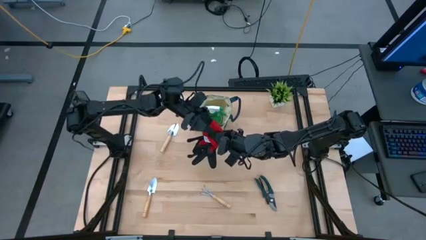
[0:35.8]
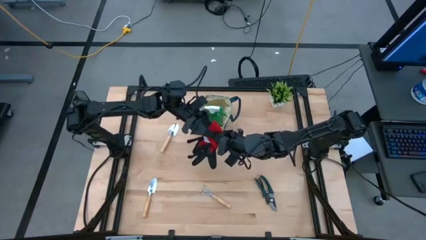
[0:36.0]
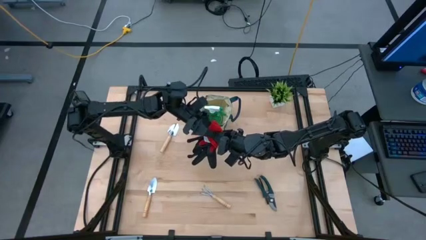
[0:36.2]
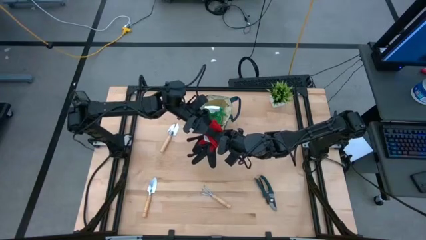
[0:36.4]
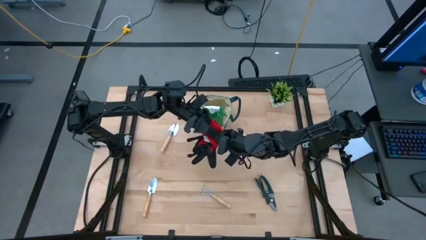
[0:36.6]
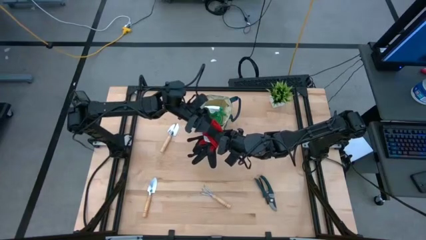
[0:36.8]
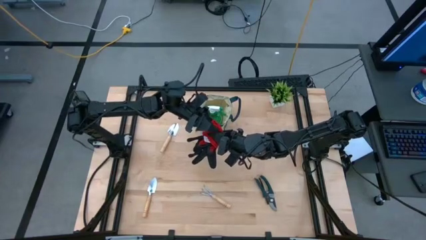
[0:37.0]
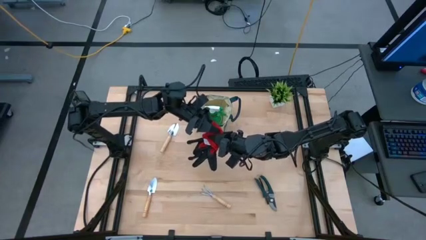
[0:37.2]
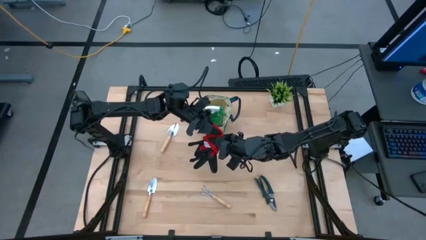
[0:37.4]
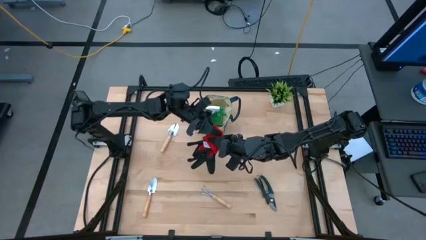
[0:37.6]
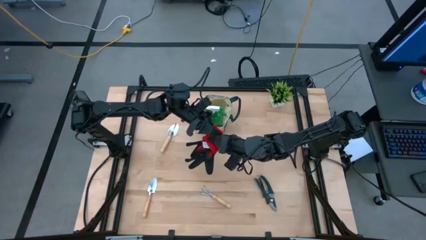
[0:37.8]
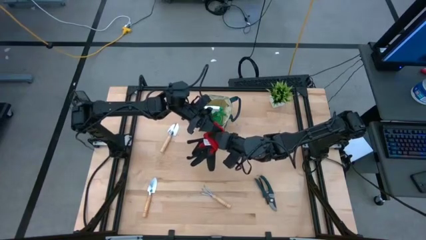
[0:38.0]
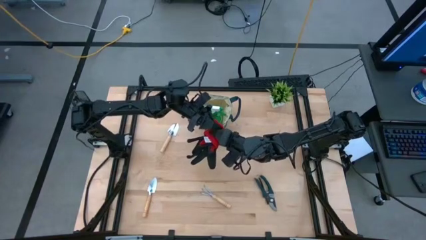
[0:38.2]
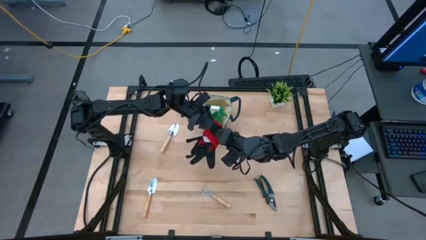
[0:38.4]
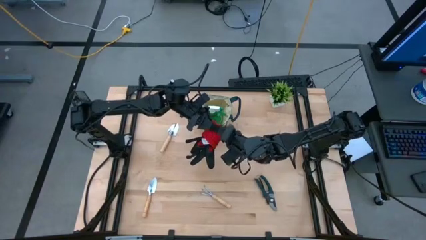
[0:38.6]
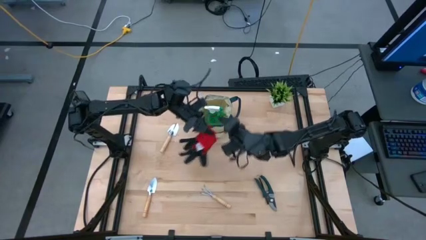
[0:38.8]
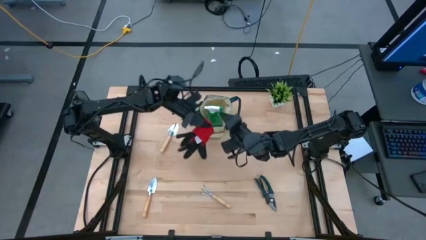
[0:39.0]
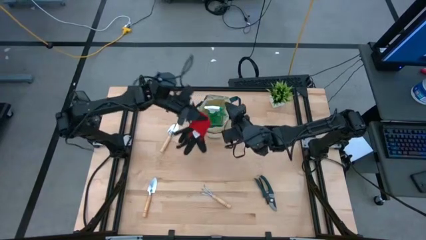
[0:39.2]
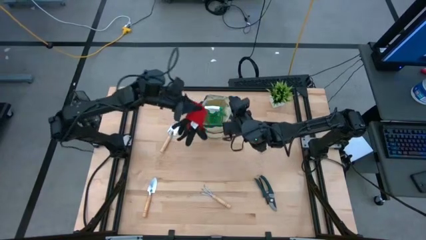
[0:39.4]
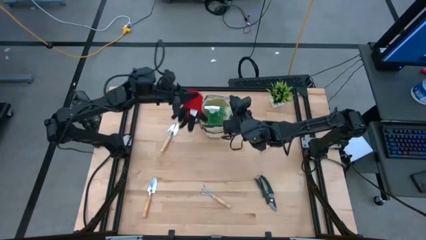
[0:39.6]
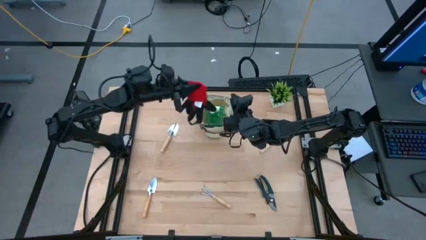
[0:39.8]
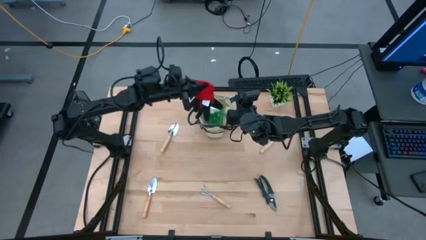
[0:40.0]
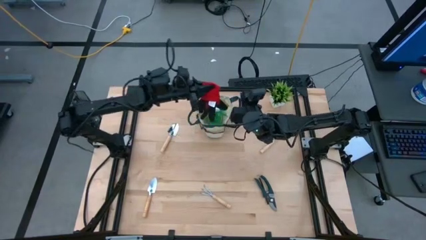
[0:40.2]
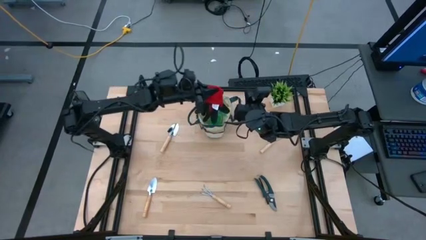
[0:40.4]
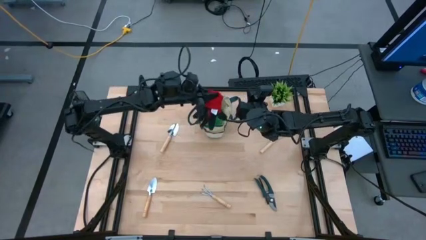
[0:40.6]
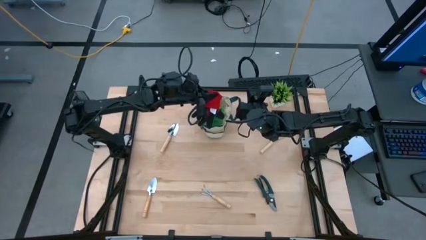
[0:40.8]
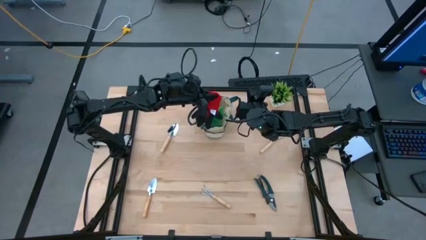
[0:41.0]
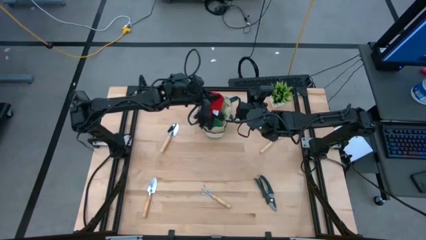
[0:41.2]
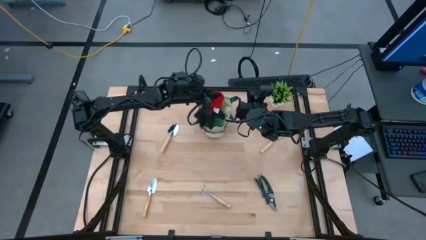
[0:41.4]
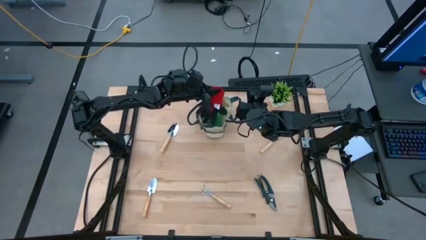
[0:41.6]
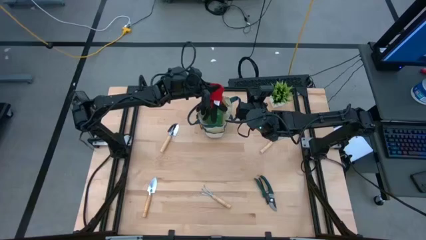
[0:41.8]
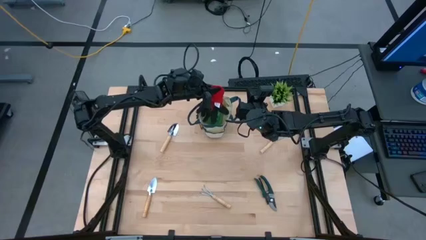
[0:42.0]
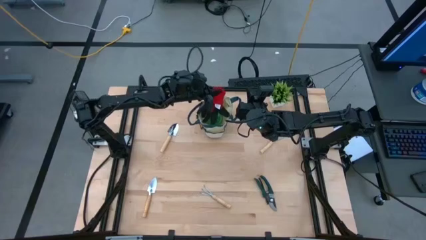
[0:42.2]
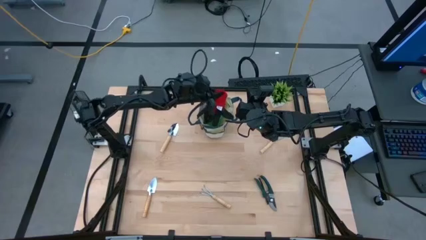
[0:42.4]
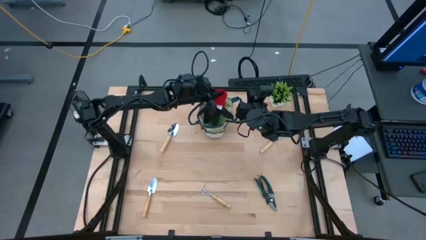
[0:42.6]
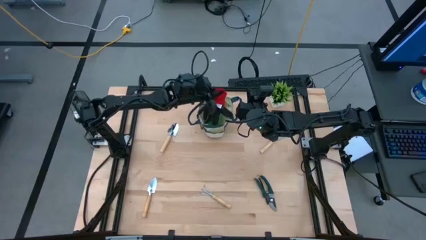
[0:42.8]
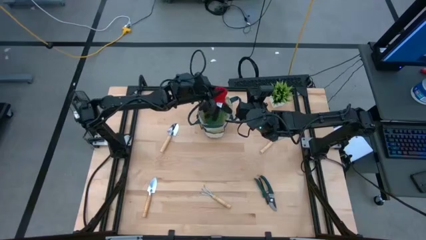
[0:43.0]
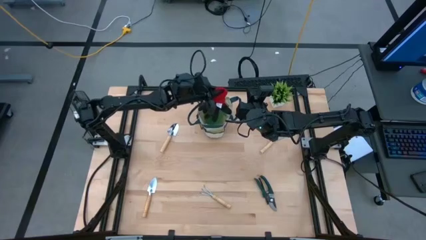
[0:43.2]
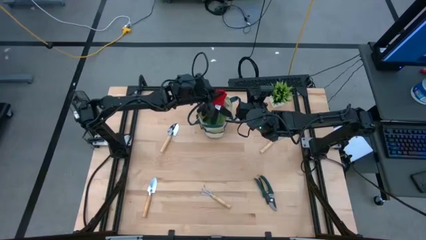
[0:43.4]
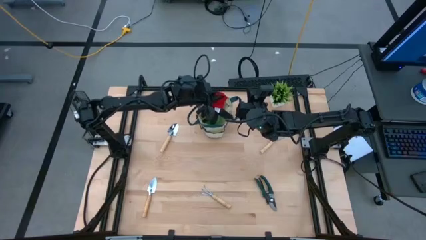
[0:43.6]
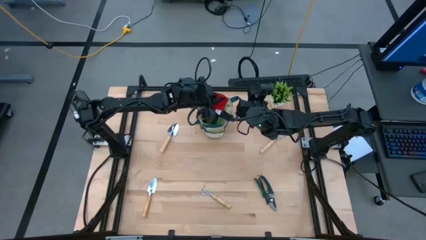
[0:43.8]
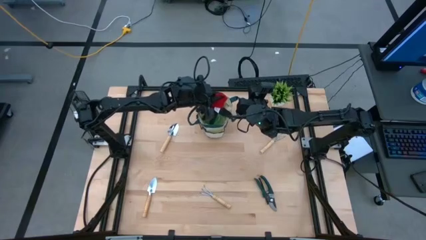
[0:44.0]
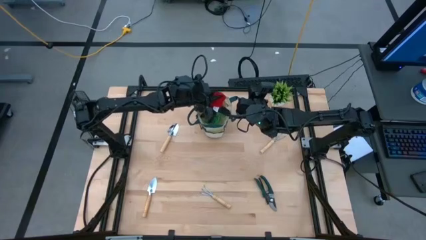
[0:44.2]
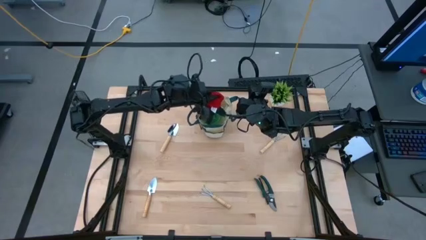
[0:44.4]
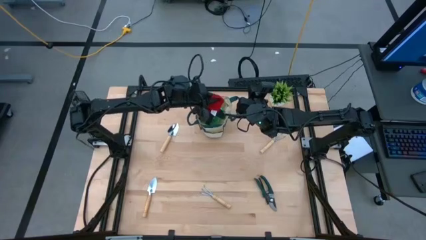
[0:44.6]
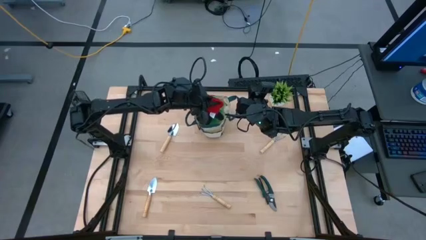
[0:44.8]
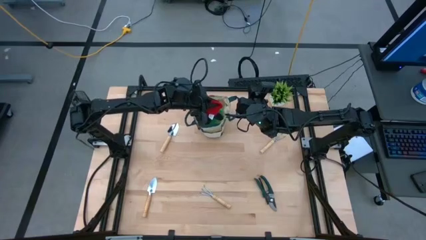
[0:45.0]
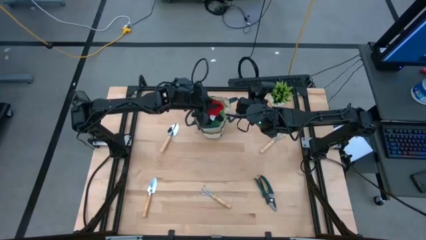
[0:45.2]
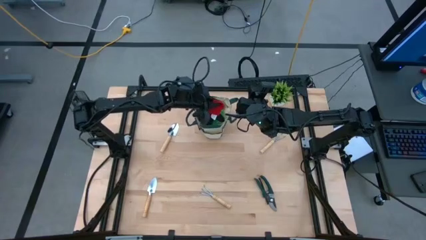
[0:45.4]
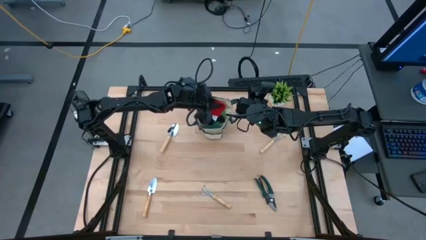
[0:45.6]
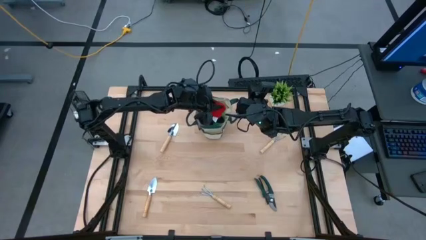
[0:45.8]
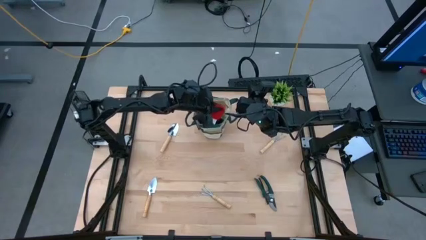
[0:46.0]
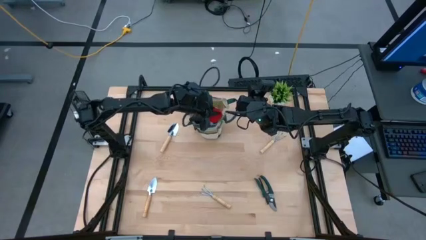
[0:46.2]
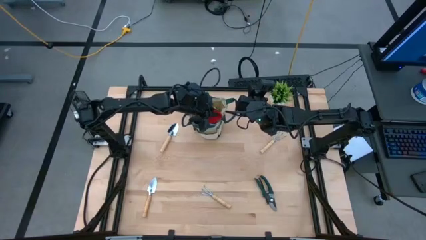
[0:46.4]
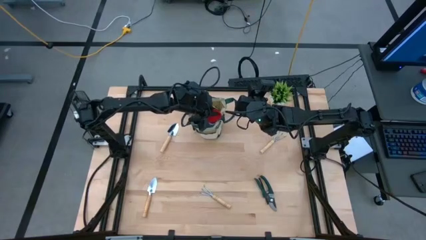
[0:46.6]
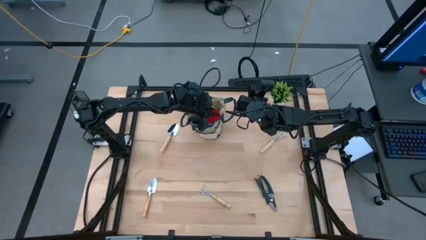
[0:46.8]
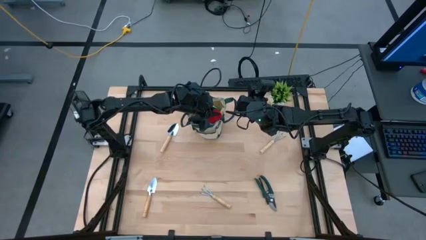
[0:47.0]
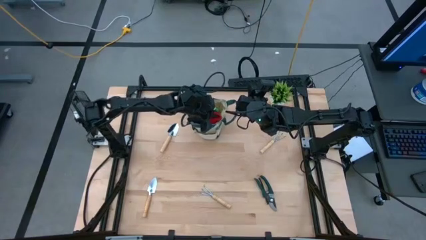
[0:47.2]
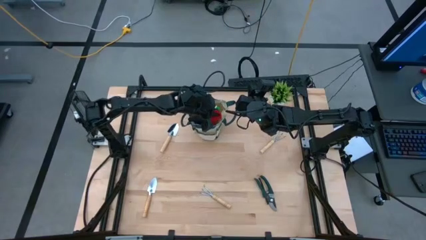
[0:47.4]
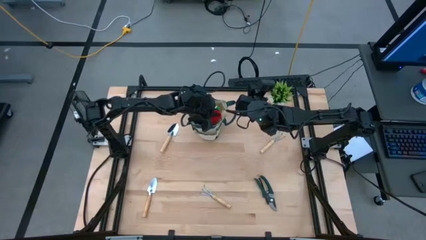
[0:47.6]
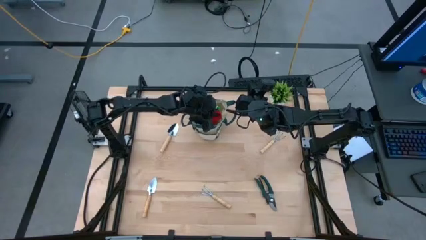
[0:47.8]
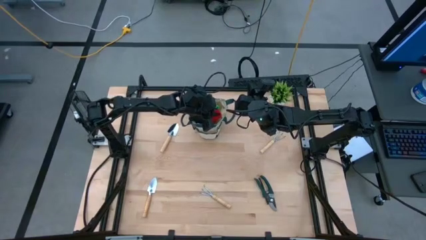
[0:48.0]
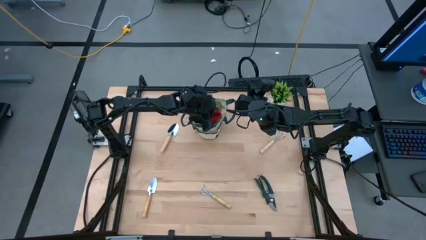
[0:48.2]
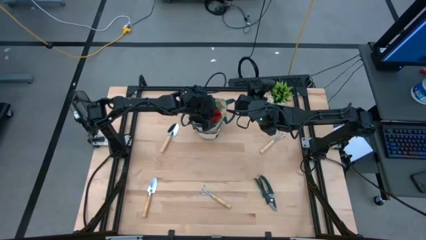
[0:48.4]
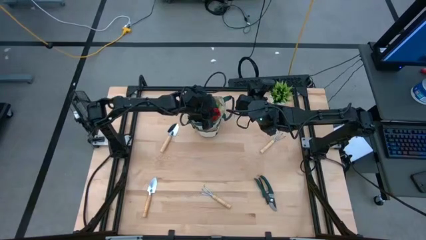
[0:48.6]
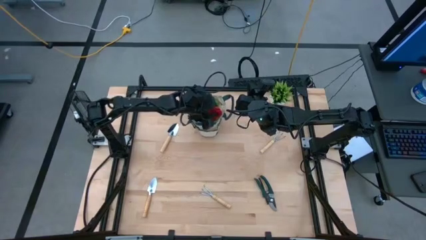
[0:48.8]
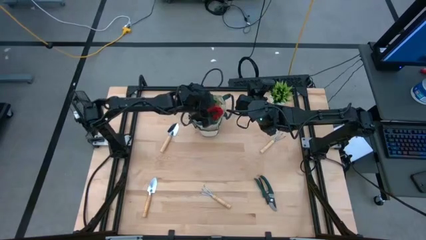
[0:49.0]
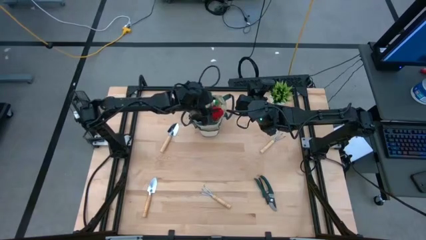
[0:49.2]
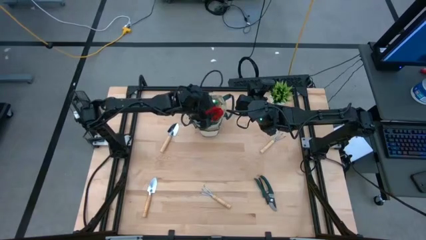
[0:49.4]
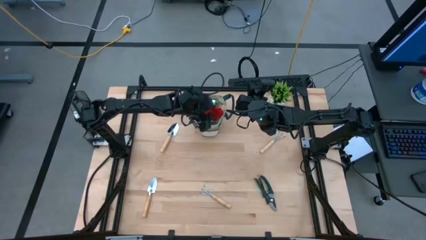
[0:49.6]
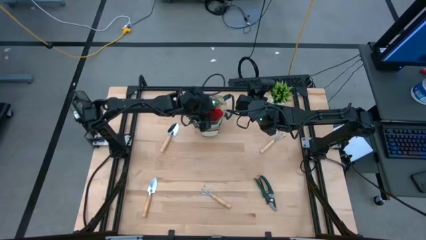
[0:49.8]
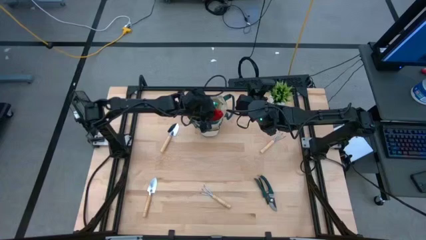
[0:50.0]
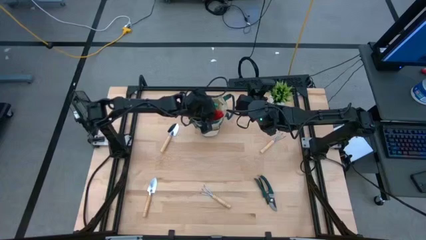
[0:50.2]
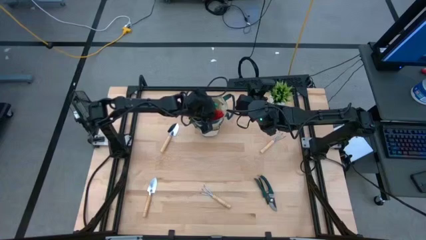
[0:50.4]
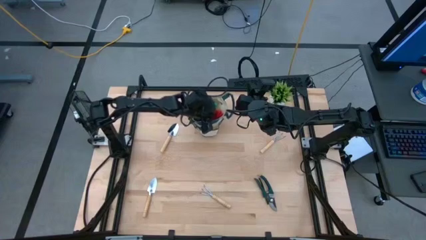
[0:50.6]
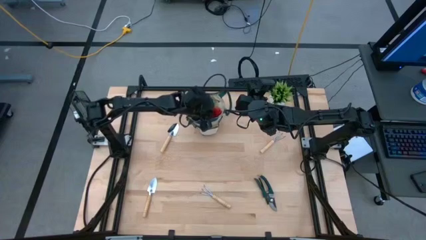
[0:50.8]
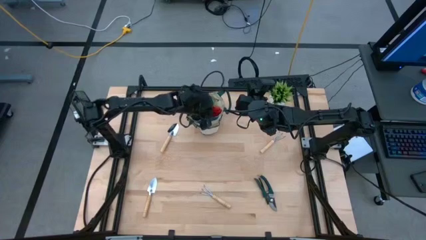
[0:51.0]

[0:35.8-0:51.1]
Task: Pick & Place Garden tools in Gardening bag
Put the red and black gloves into the gardening bag
